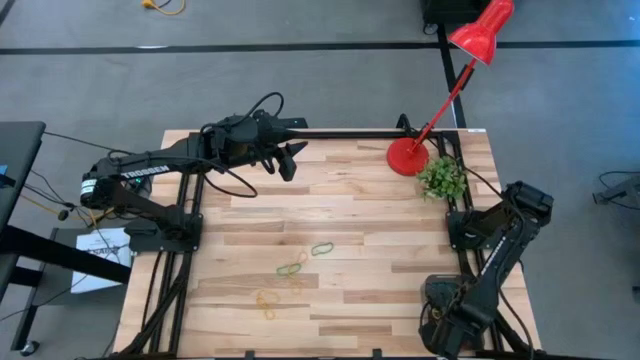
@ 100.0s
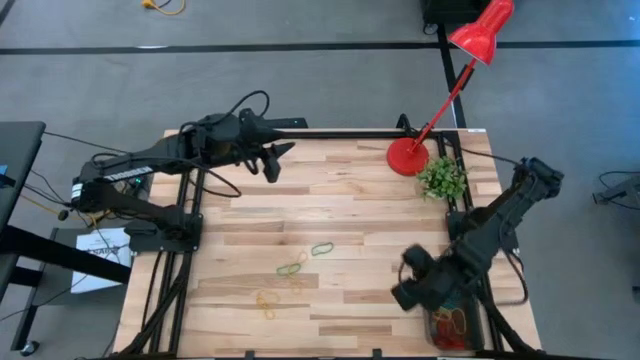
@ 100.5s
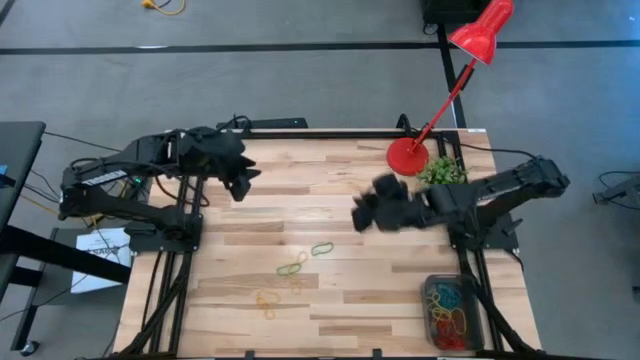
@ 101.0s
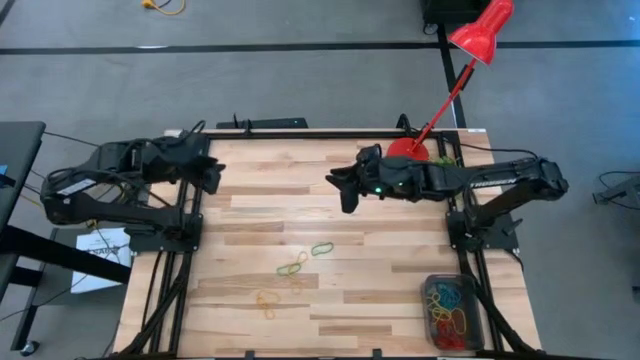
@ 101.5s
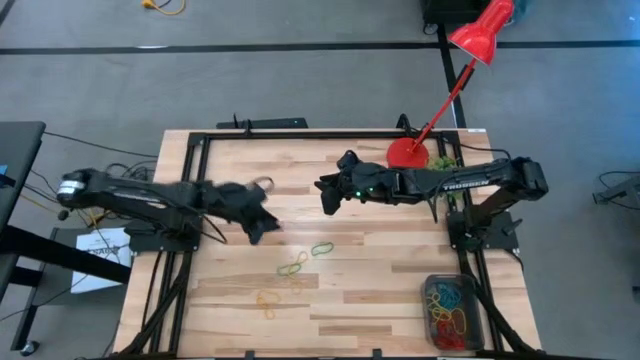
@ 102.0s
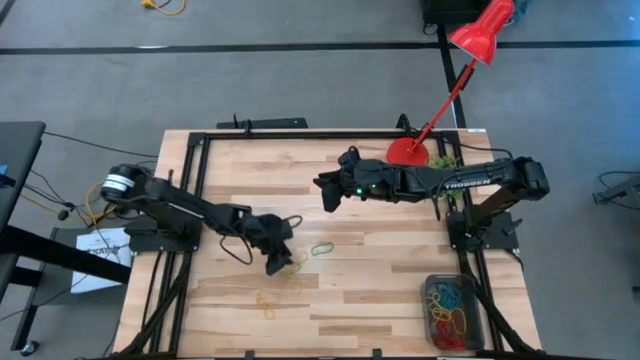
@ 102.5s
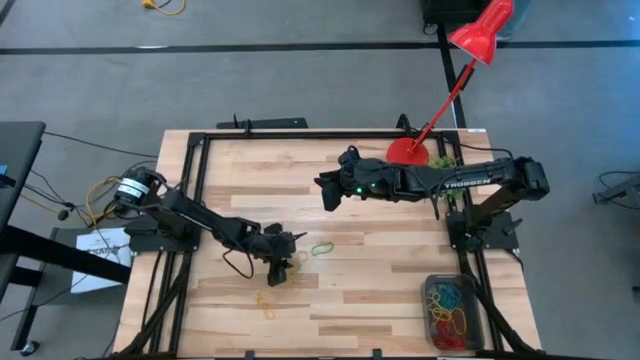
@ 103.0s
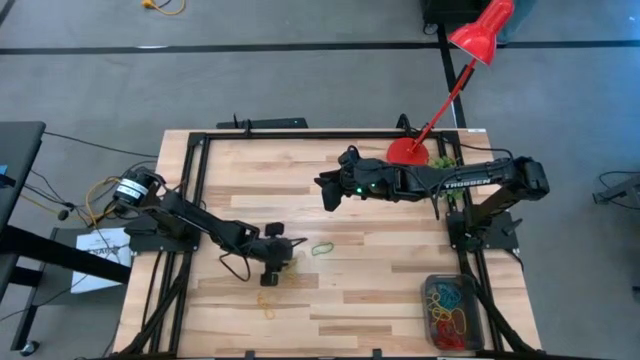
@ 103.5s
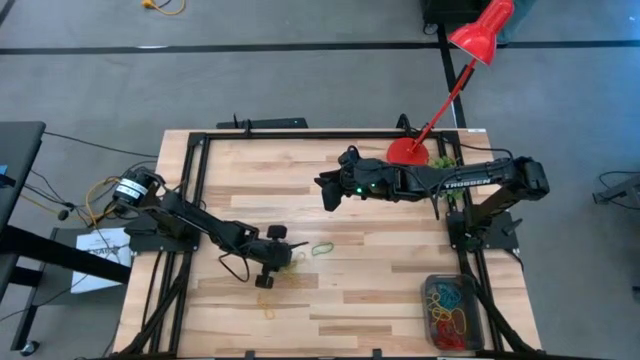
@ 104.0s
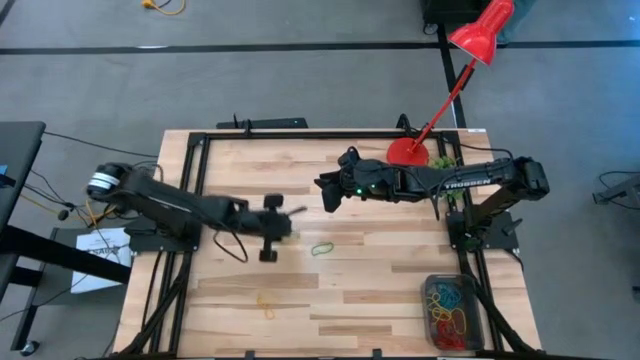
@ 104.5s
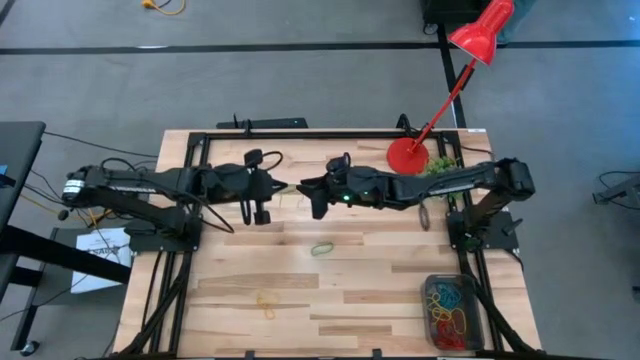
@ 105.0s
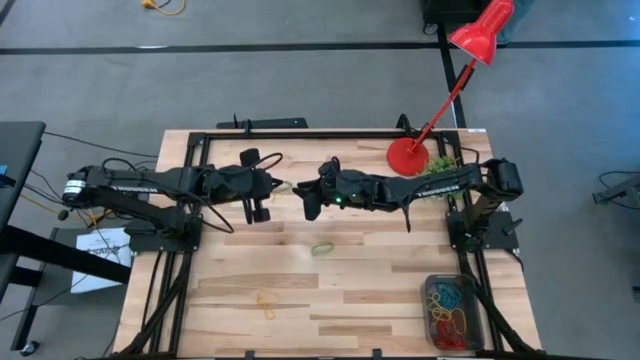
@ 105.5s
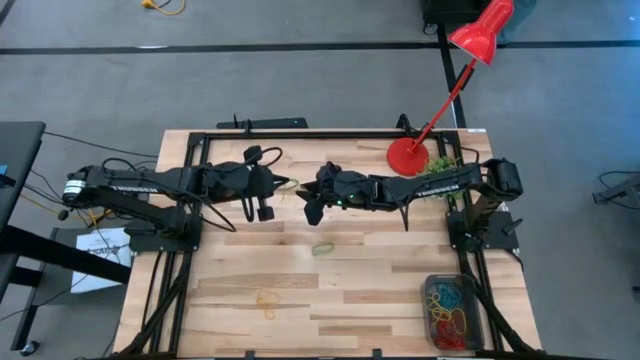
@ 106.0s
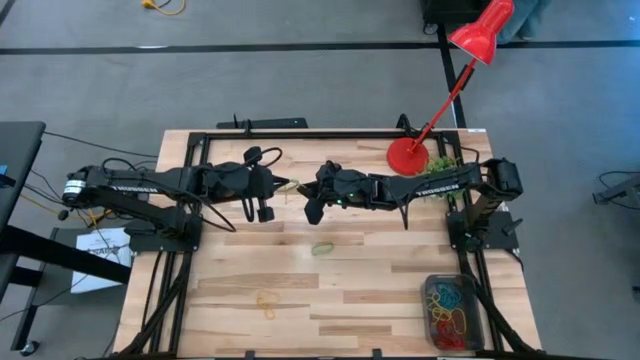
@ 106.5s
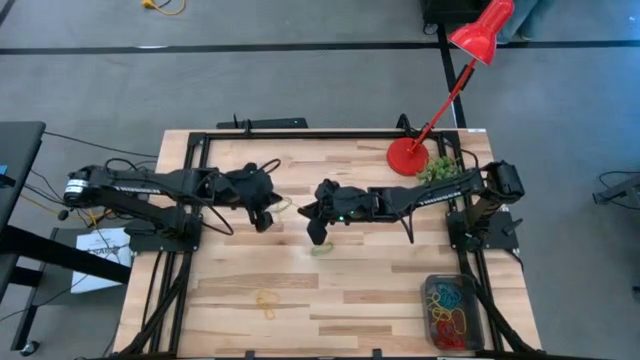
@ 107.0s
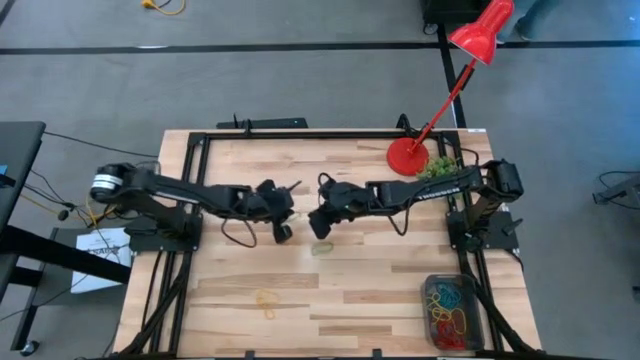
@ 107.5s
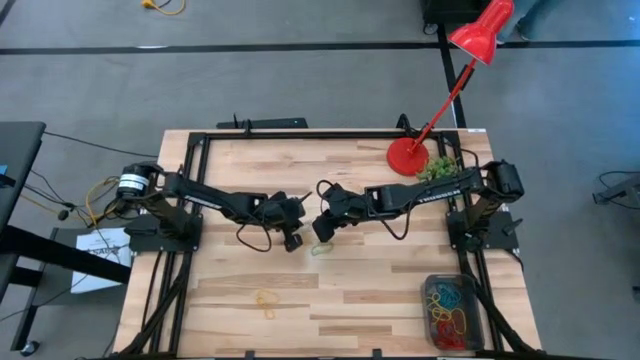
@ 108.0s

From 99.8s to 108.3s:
Task: Pick and place items into bin
Put the yellow rubber band into the black bin

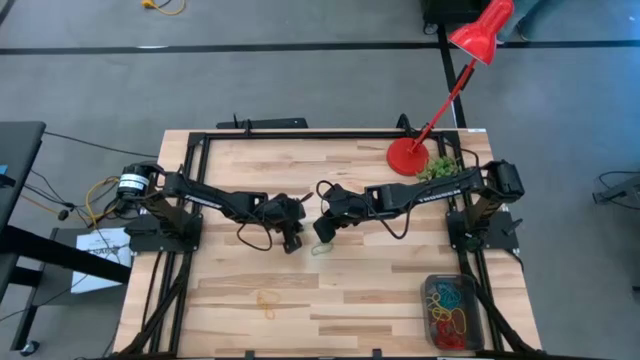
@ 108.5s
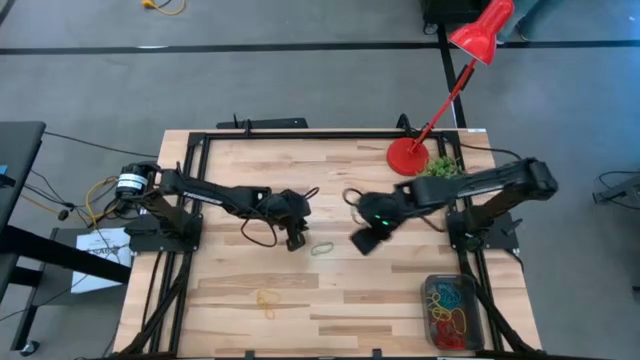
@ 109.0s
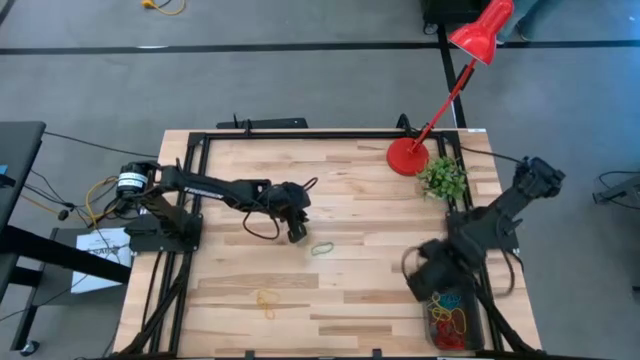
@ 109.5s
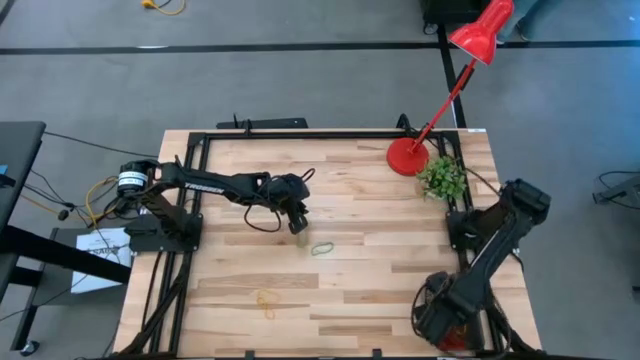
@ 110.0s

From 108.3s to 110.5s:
Put the yellow rubber band into the black bin

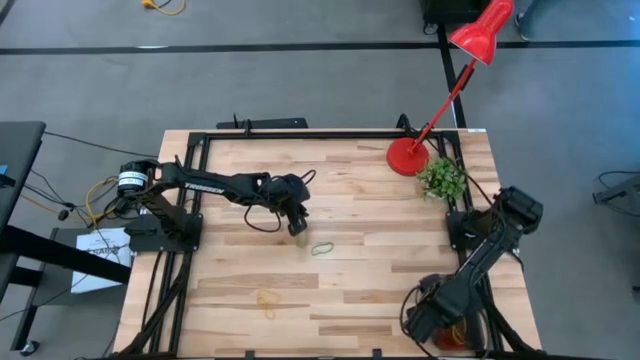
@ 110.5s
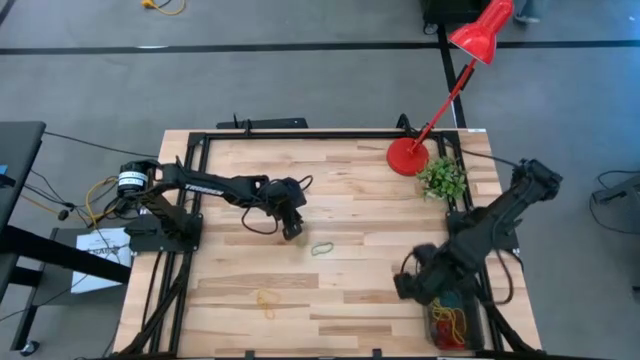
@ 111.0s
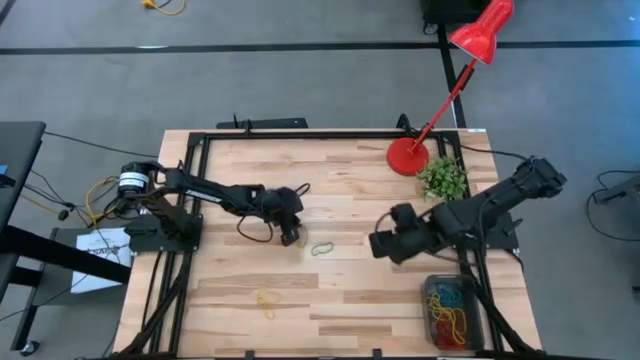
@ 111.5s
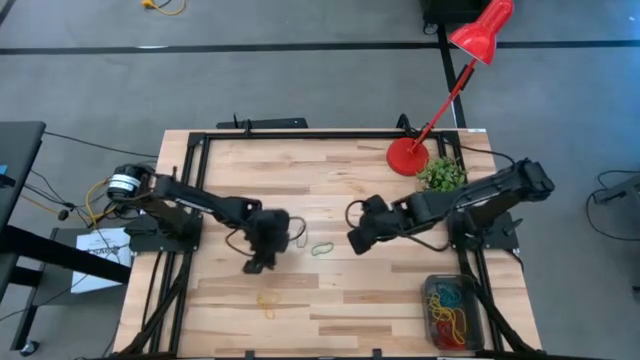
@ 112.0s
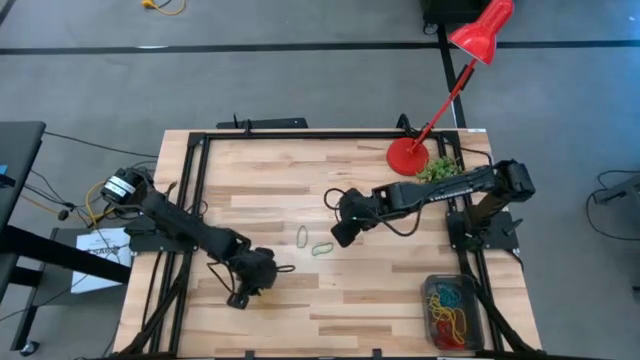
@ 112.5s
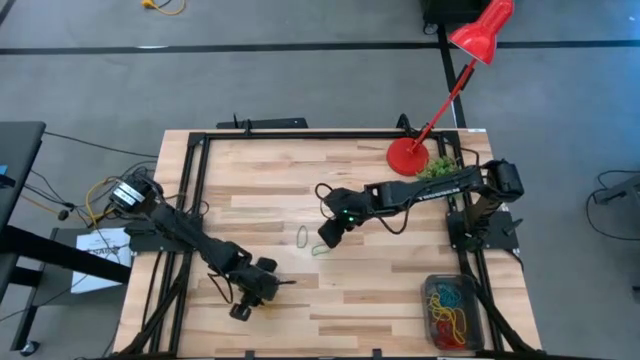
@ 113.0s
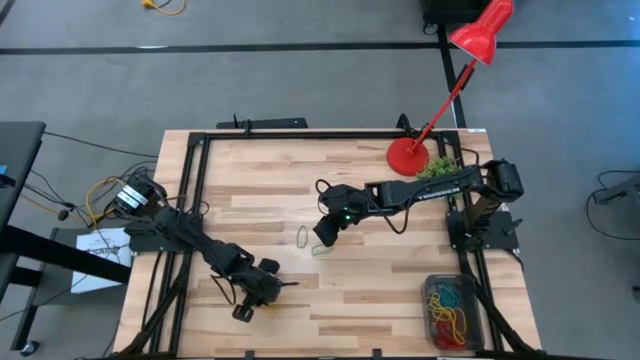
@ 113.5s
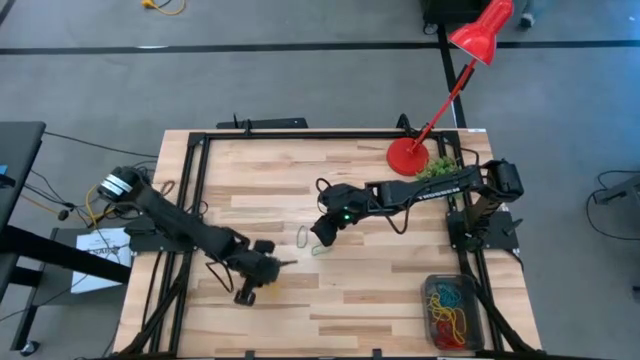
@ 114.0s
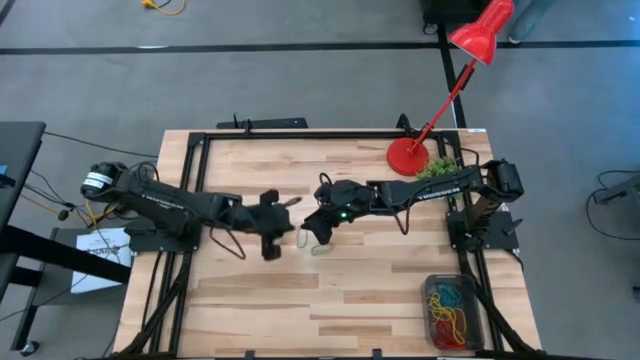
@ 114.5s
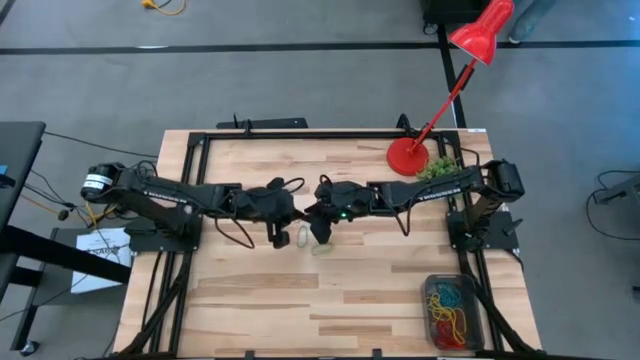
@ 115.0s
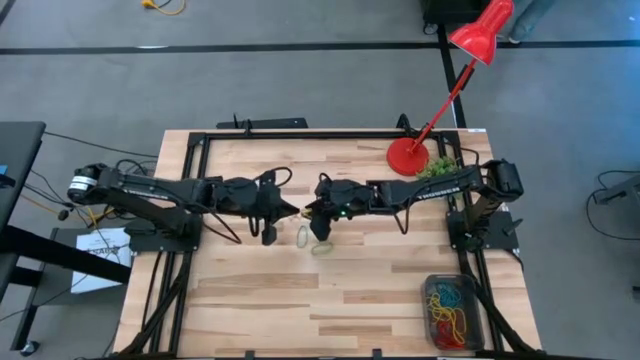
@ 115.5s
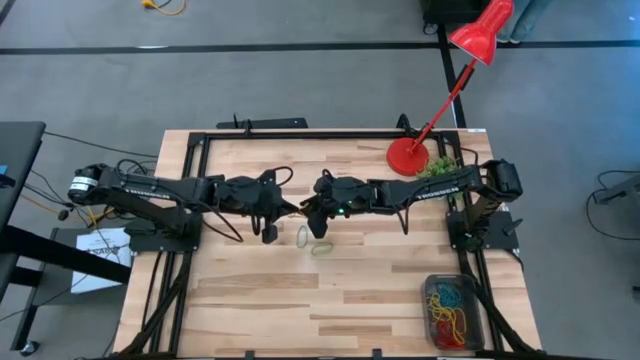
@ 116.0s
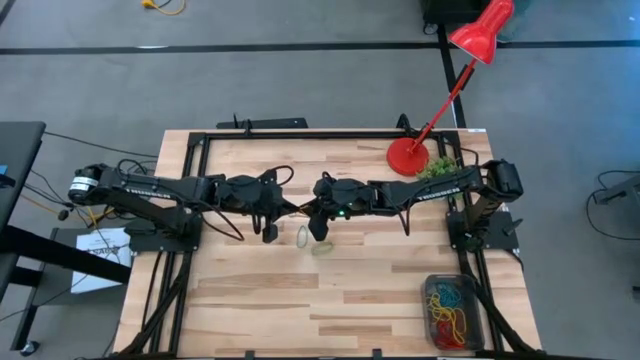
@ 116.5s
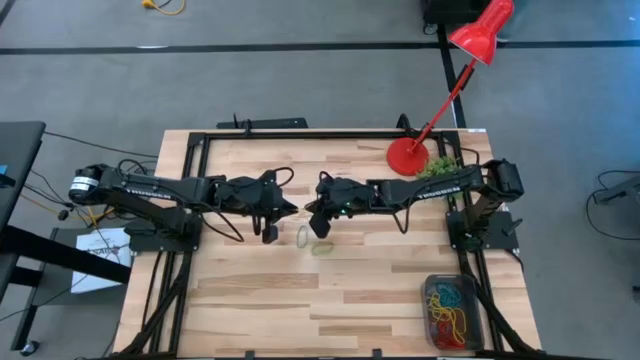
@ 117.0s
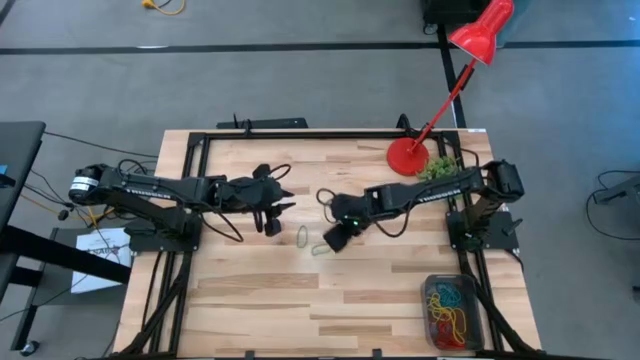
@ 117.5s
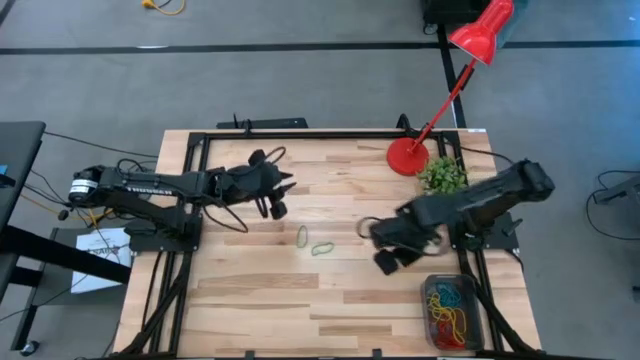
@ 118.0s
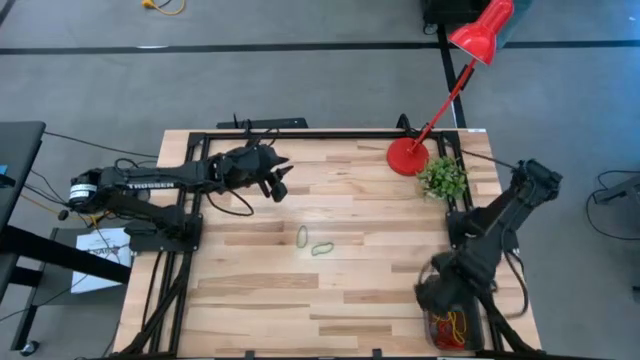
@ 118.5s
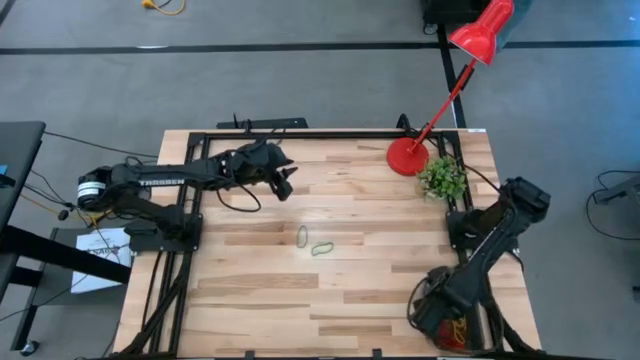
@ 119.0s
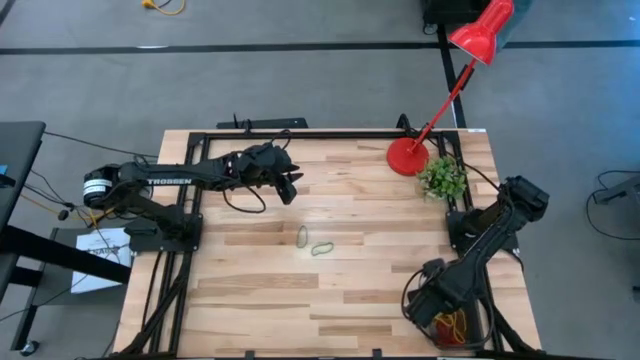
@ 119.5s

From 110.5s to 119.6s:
Put the yellow rubber band into the black bin
